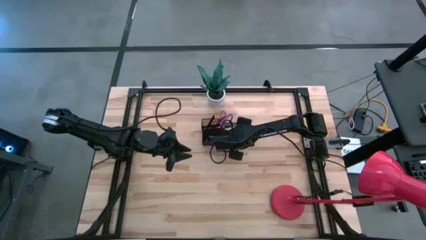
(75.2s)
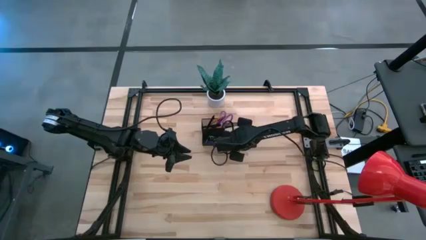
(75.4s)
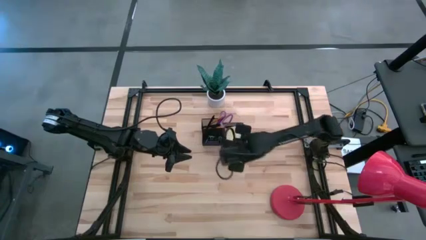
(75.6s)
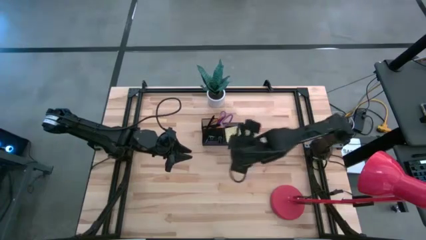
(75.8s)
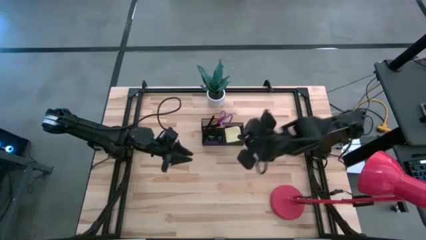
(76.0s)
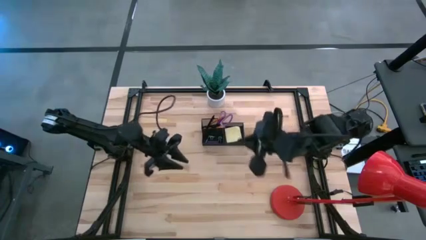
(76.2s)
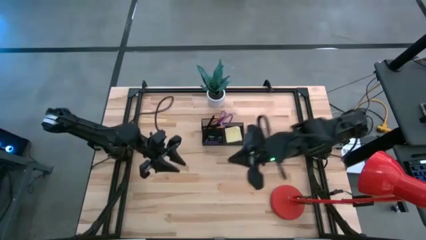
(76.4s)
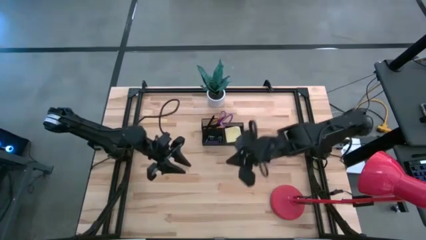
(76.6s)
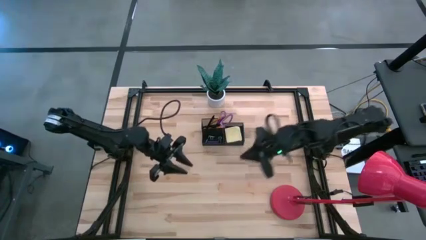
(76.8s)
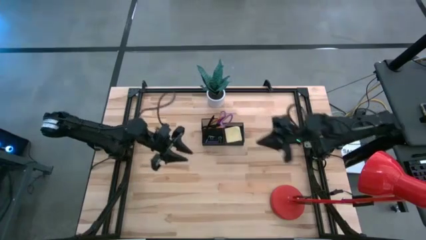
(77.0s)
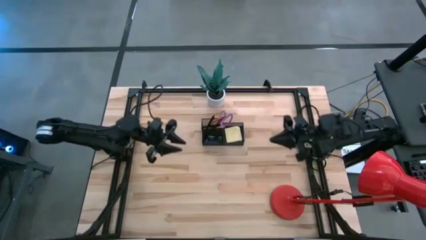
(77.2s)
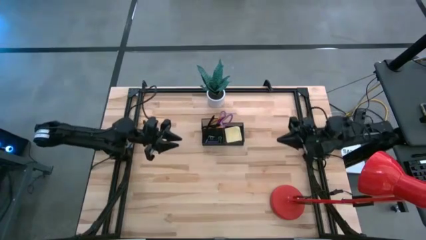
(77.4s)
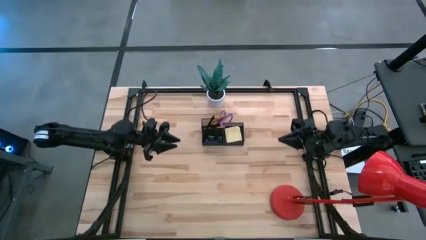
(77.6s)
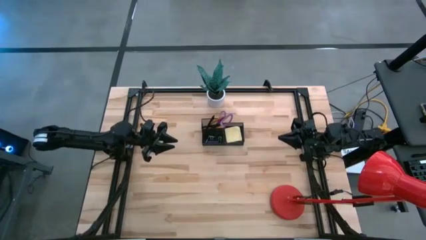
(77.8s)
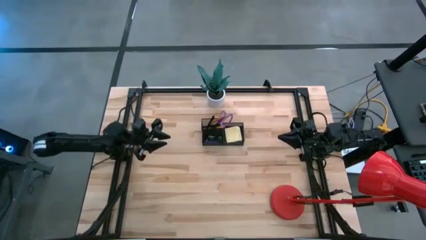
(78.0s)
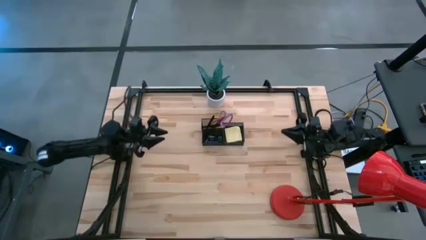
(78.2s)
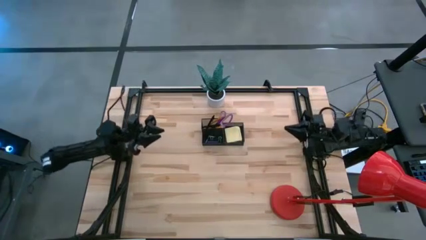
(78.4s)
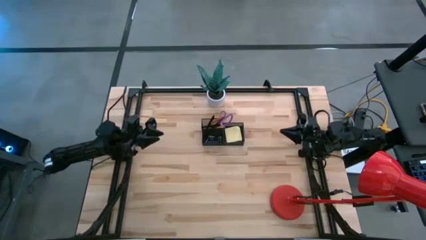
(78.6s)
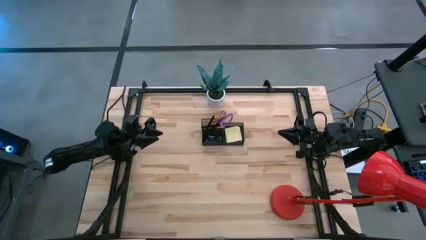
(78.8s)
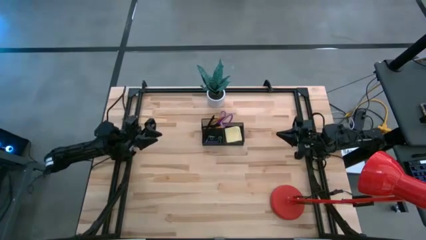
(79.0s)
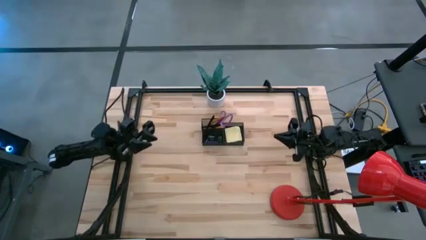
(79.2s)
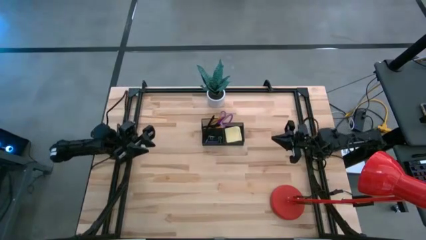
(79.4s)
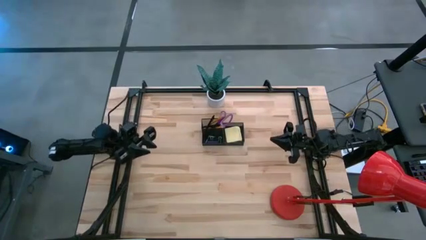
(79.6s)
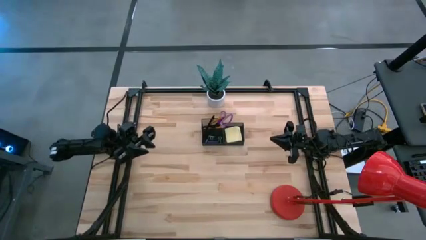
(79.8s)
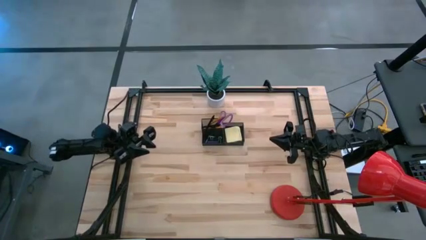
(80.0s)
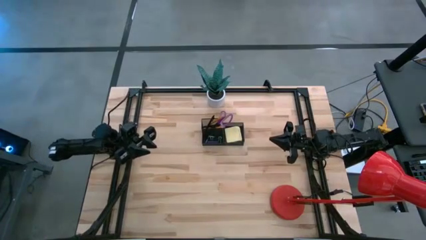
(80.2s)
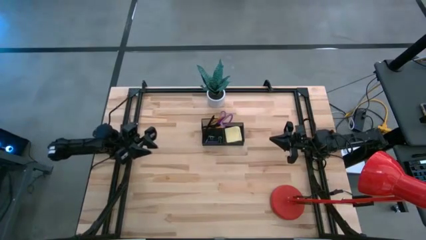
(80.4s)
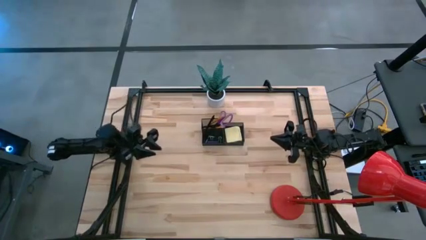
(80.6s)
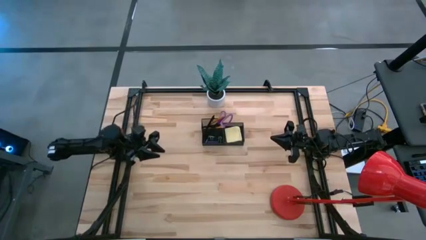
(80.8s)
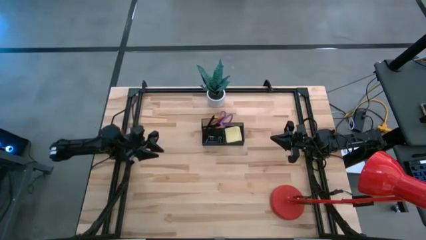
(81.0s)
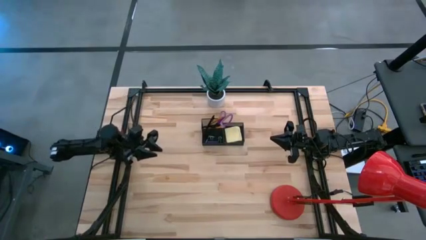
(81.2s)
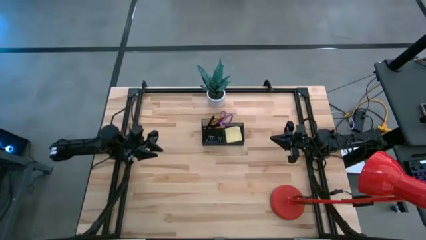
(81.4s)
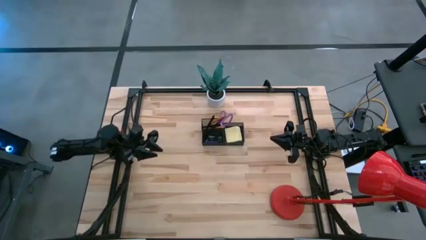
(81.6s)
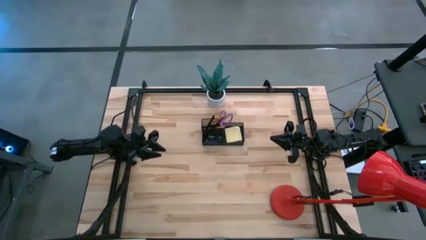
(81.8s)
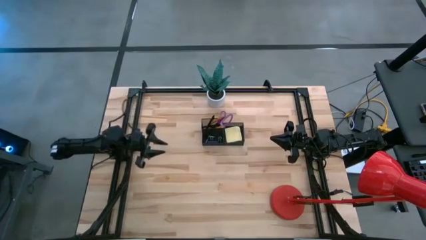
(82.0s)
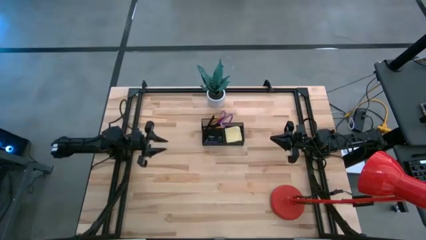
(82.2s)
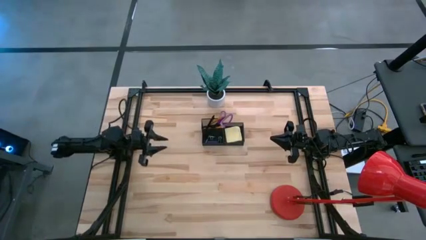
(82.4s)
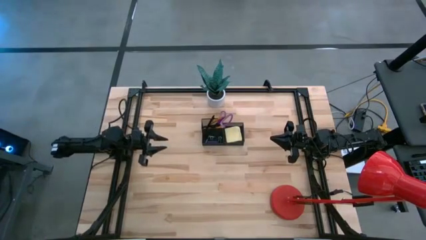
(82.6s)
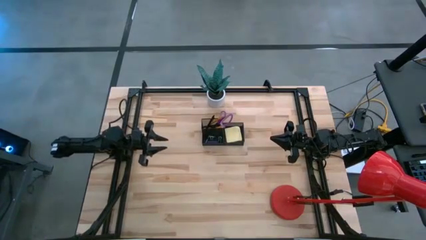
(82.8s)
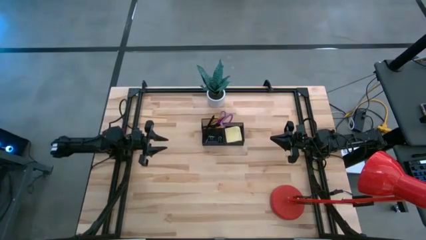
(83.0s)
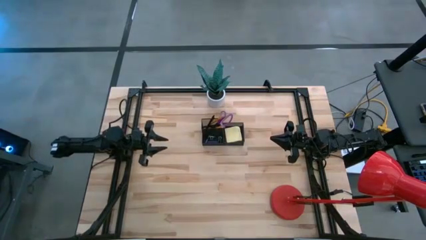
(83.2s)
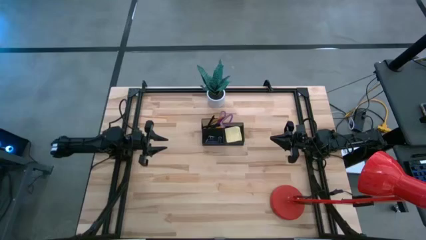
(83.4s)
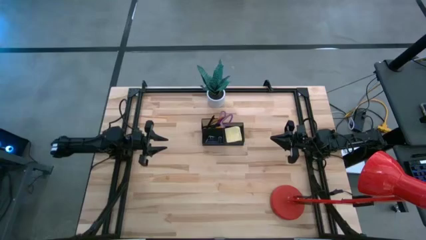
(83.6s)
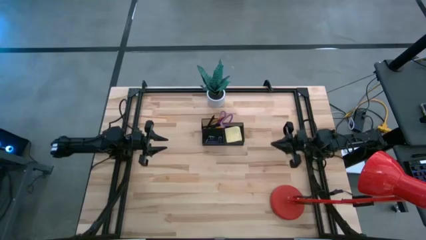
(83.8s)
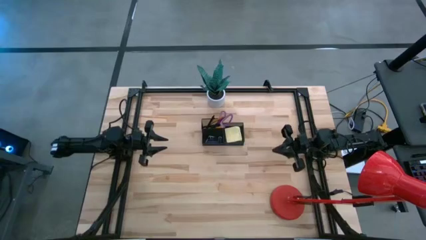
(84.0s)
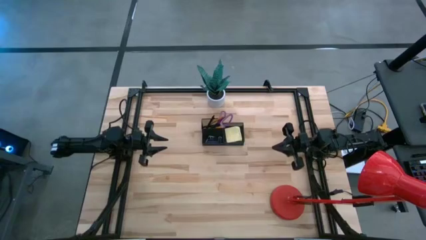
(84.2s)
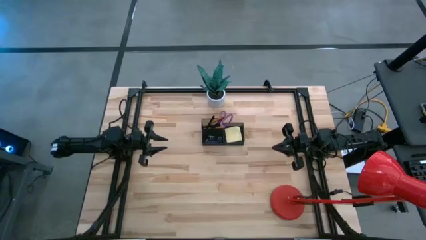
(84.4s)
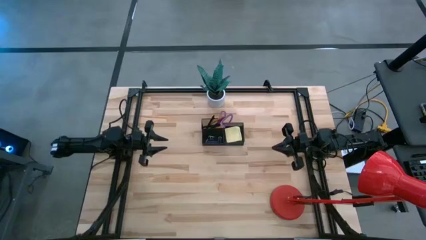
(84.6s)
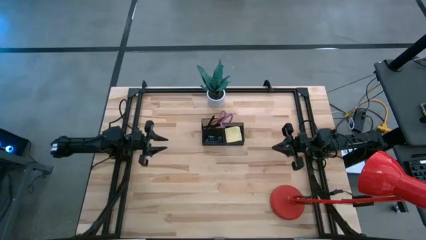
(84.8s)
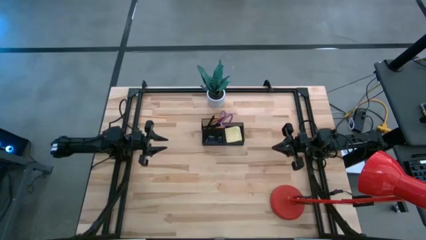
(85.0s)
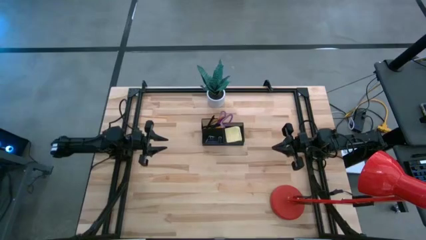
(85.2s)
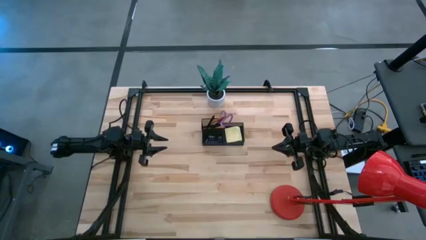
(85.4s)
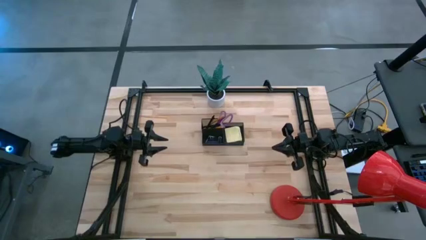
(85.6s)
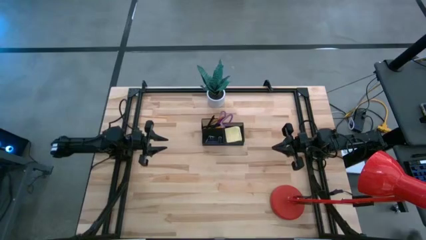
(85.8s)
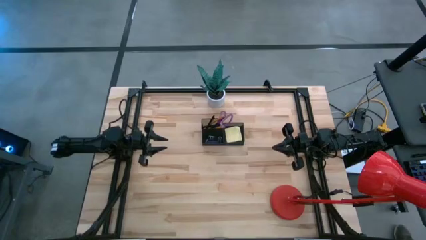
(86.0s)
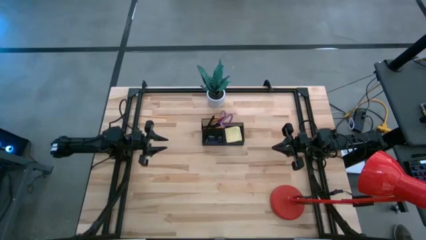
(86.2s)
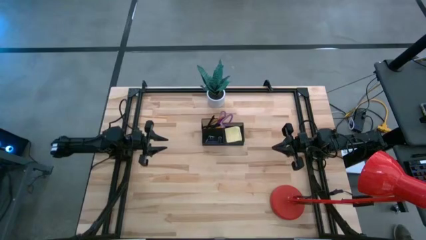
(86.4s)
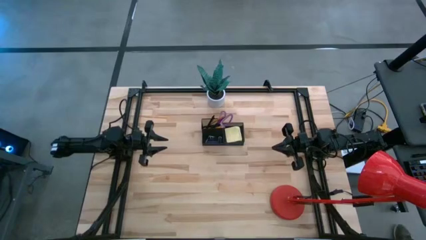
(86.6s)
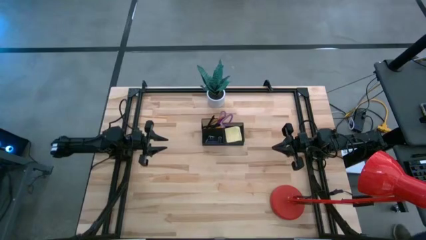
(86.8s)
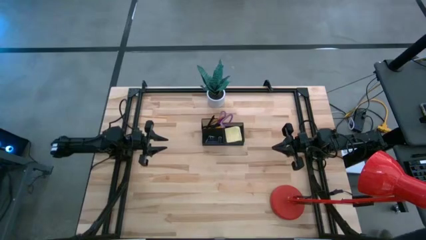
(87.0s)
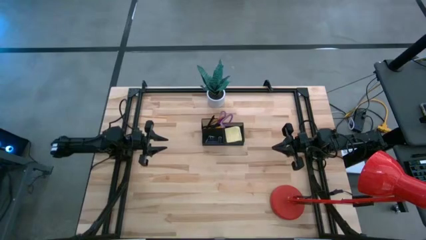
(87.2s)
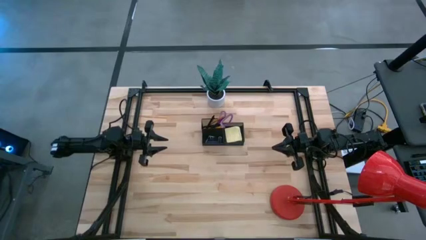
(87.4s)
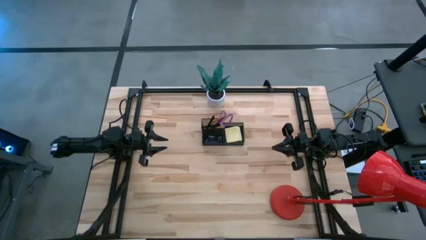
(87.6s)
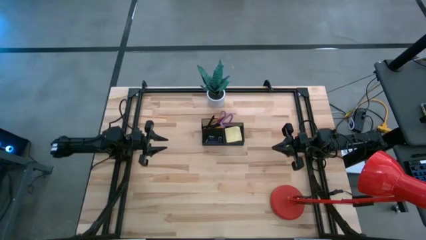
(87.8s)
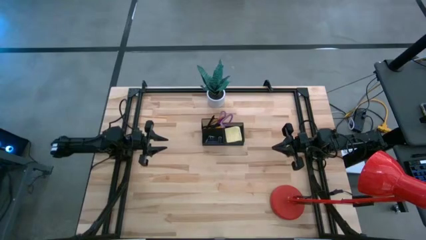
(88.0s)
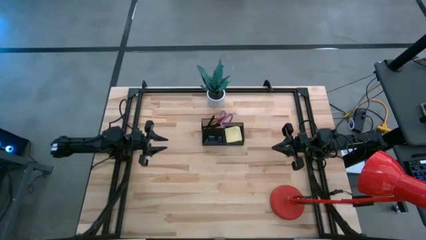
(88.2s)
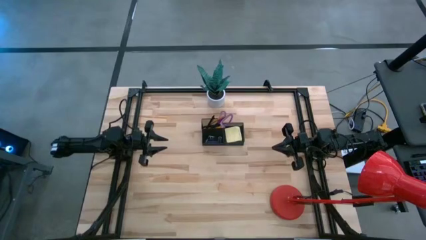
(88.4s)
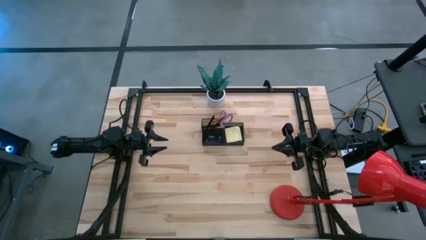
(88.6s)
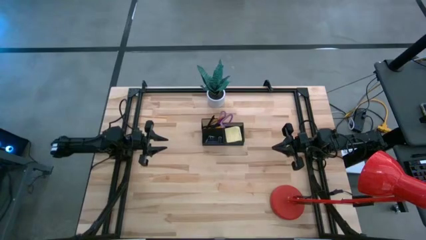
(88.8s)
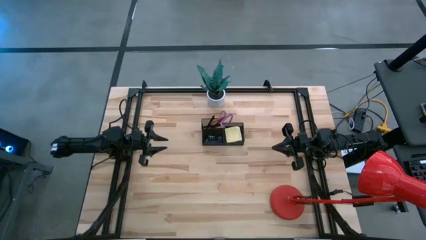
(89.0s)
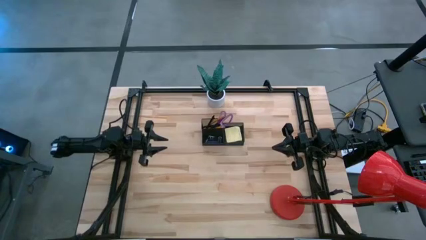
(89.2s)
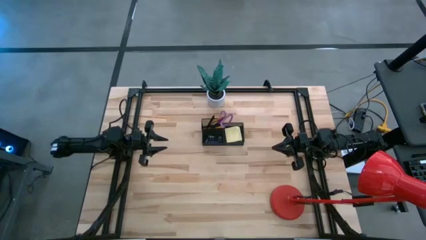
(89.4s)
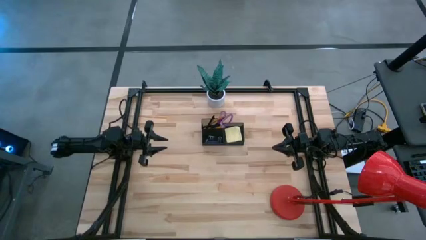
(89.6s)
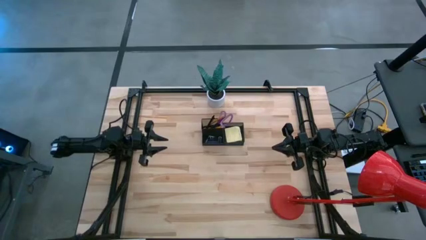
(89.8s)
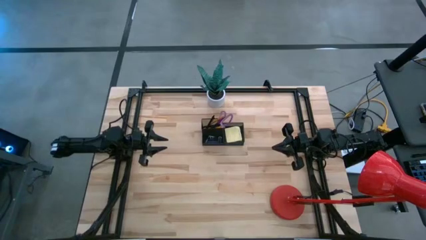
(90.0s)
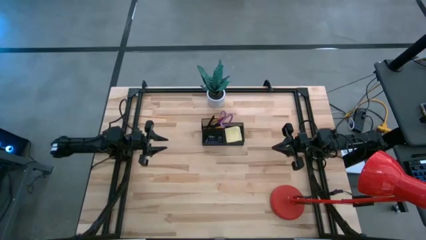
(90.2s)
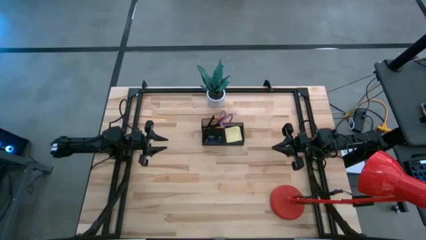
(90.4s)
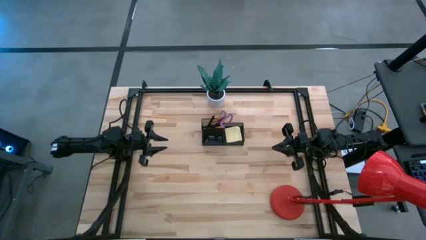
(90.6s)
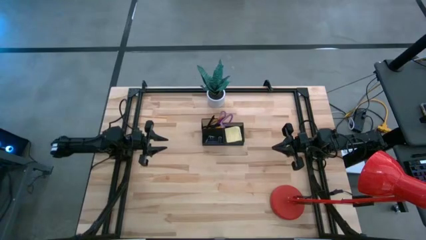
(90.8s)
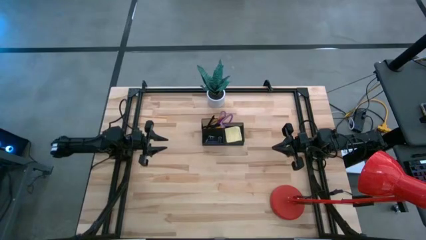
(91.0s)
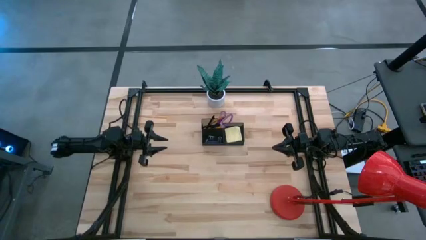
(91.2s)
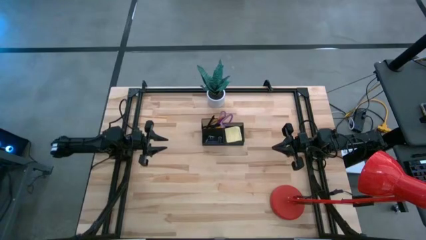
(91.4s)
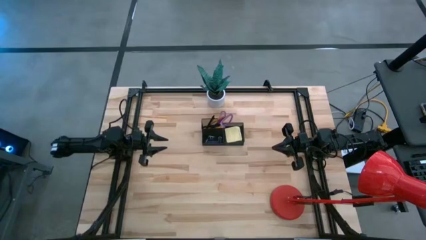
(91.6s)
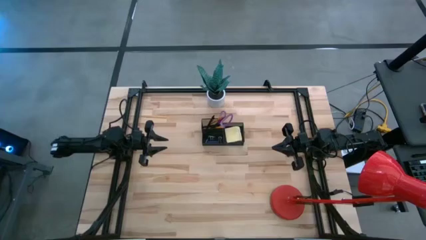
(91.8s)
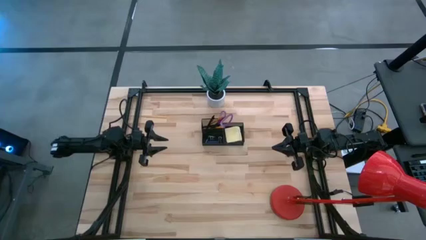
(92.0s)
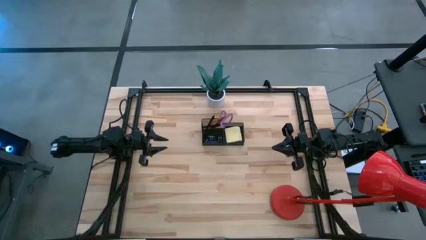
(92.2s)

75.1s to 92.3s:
Task: Pick and place office supplies into organizer
Return to Home Position
